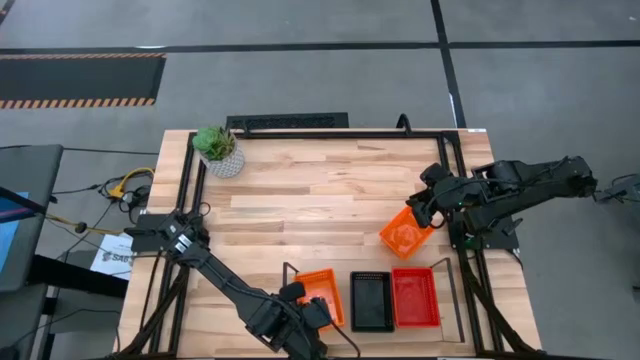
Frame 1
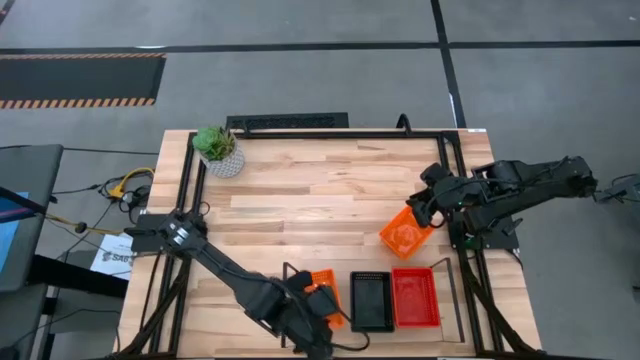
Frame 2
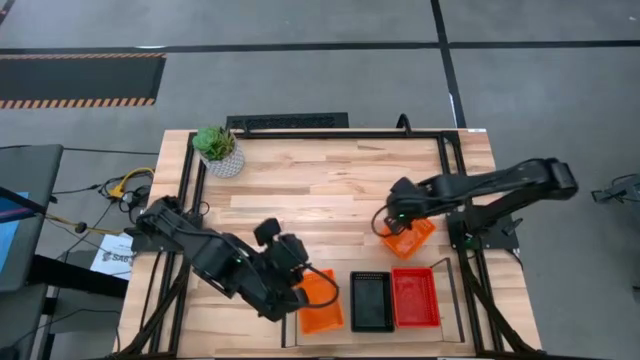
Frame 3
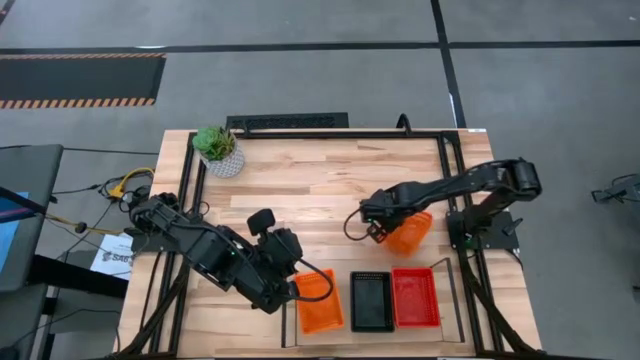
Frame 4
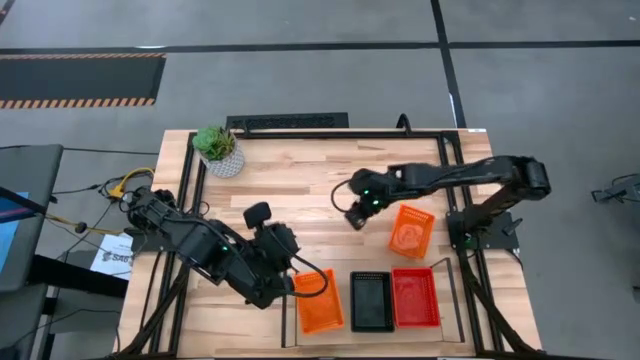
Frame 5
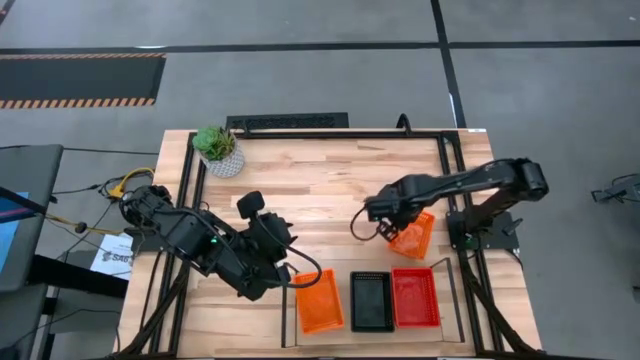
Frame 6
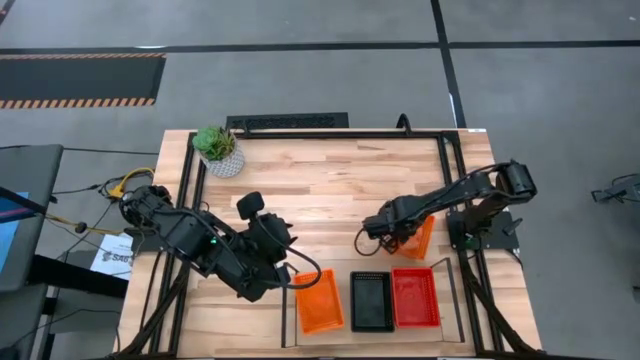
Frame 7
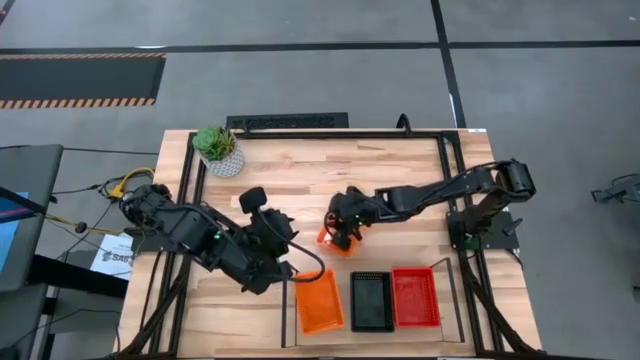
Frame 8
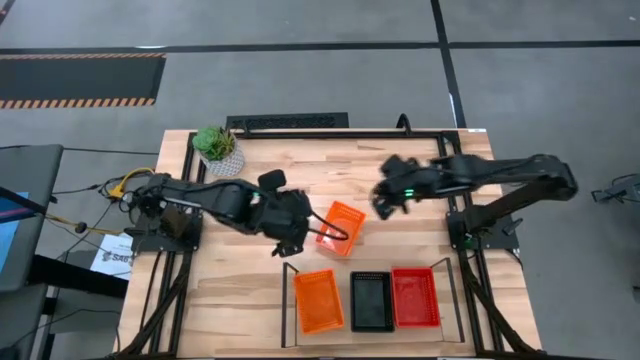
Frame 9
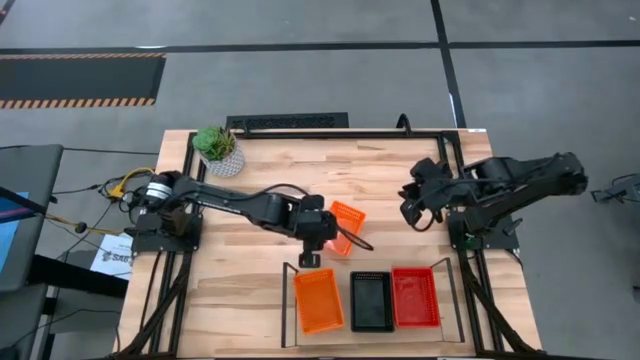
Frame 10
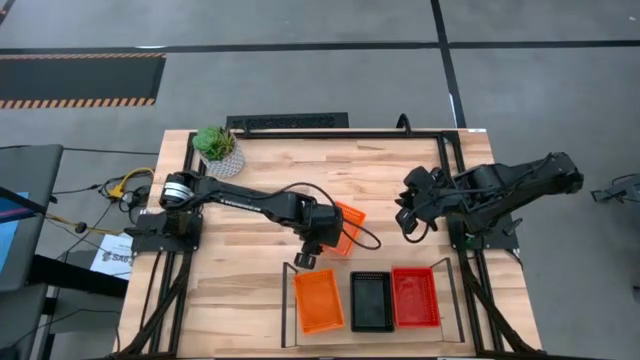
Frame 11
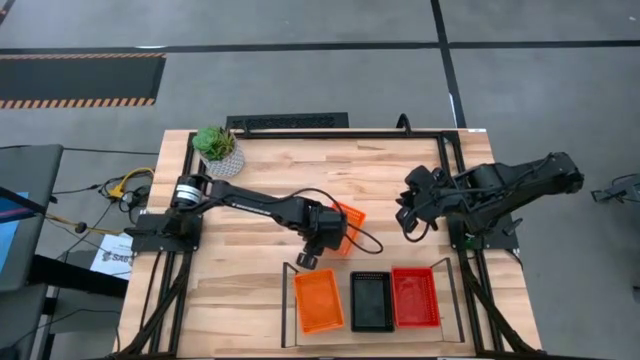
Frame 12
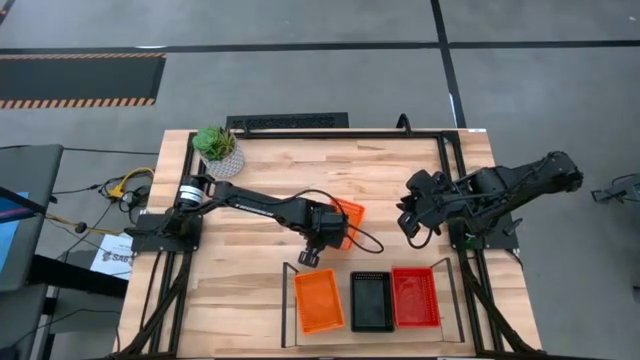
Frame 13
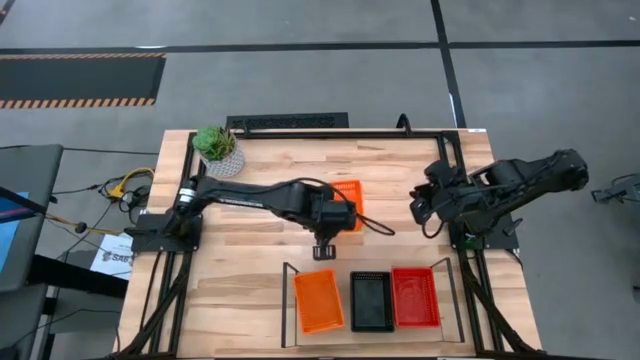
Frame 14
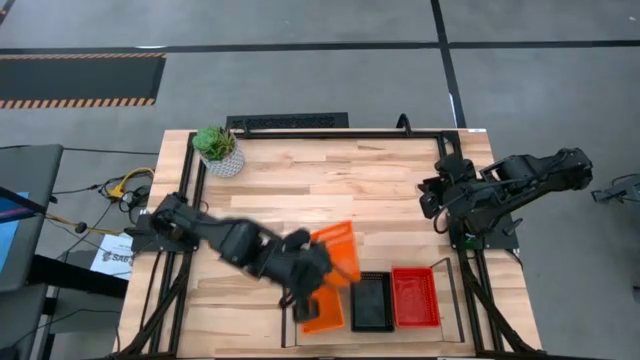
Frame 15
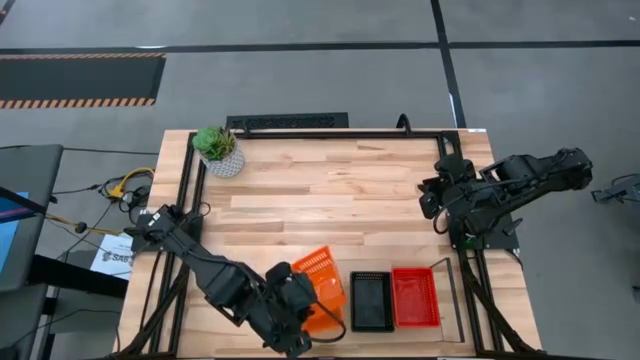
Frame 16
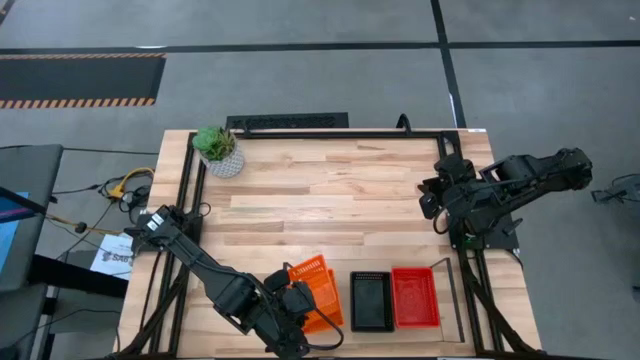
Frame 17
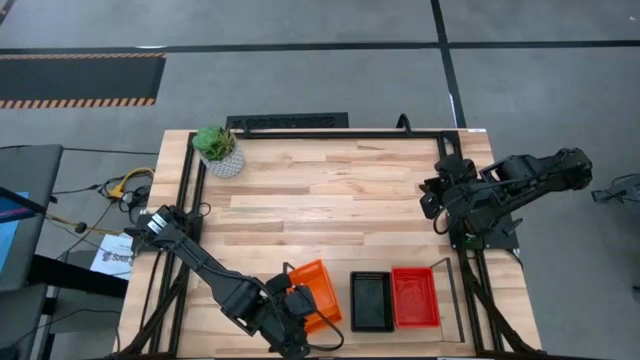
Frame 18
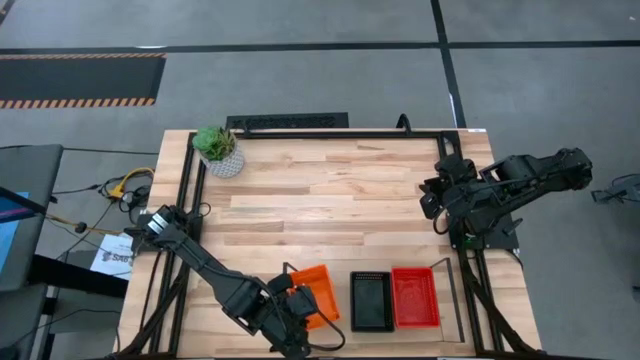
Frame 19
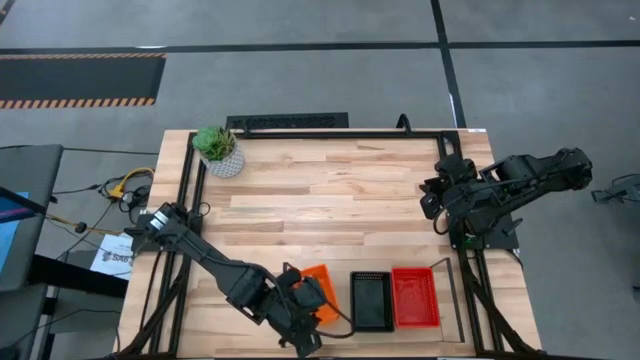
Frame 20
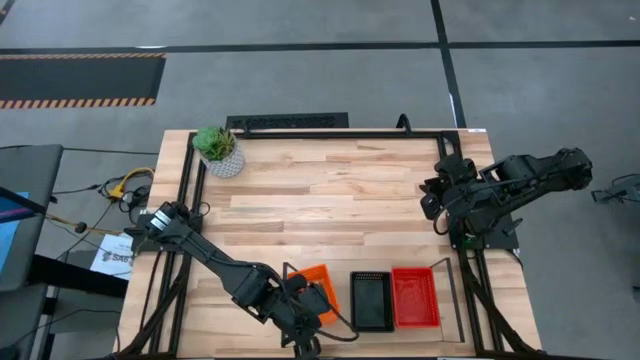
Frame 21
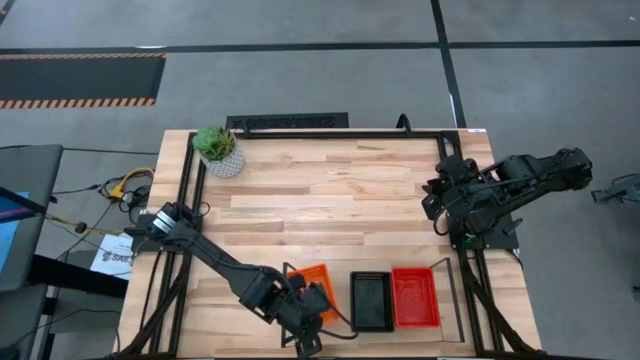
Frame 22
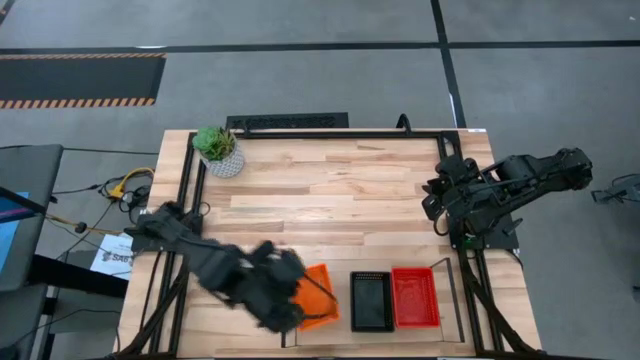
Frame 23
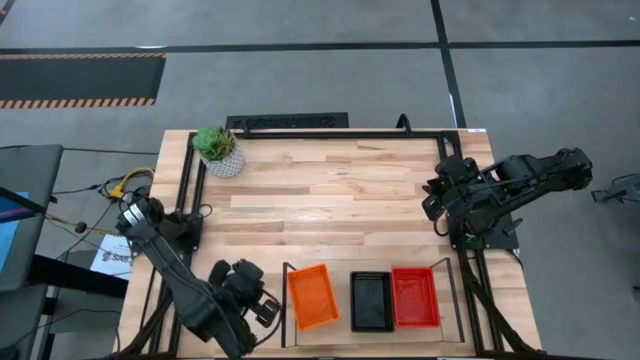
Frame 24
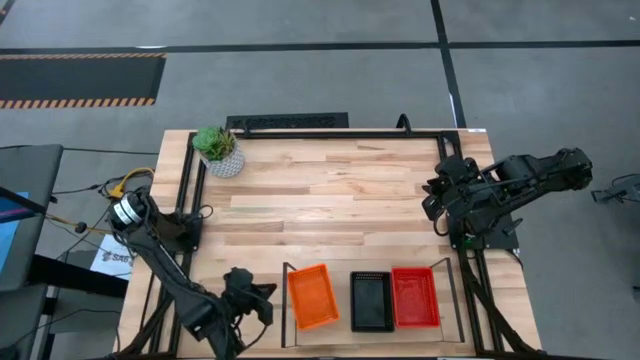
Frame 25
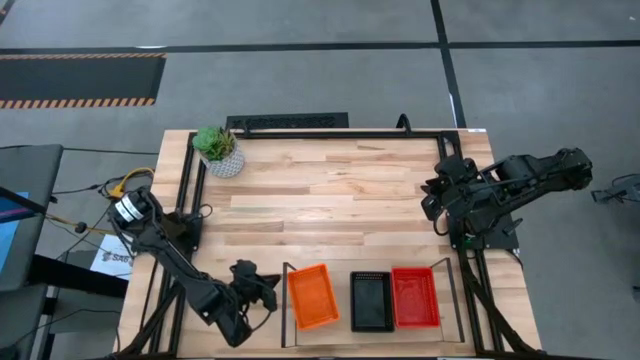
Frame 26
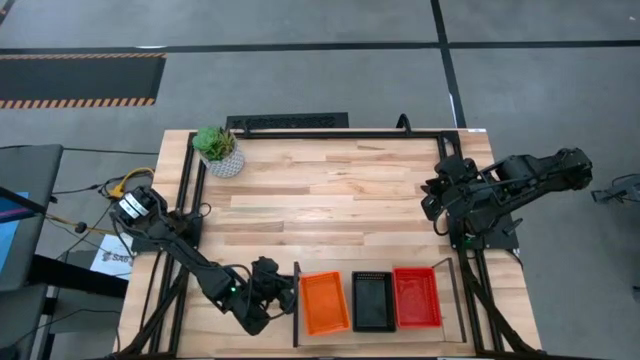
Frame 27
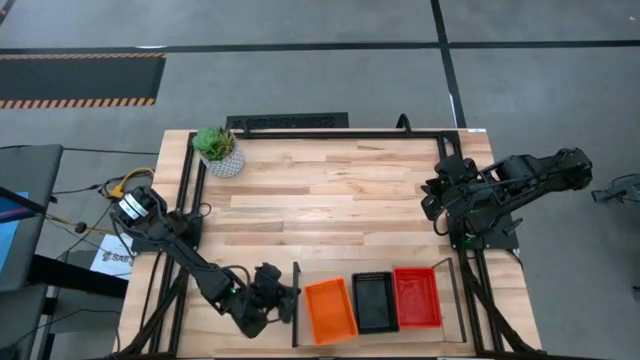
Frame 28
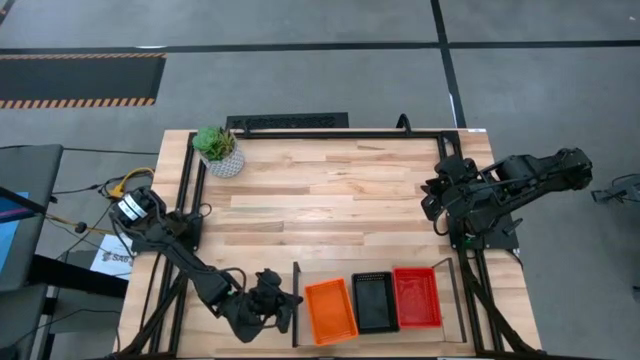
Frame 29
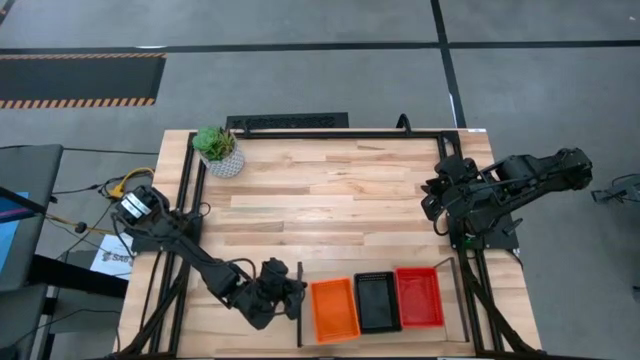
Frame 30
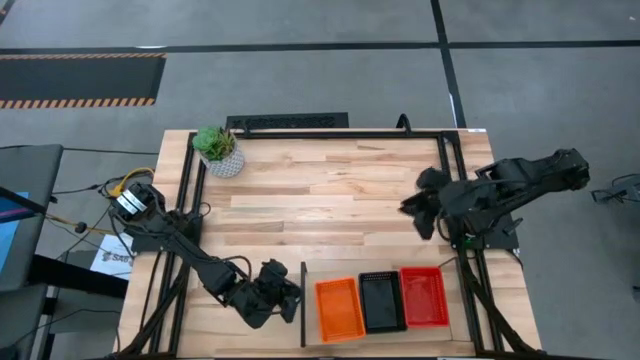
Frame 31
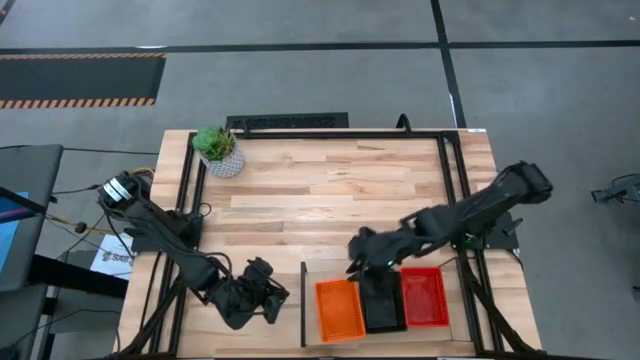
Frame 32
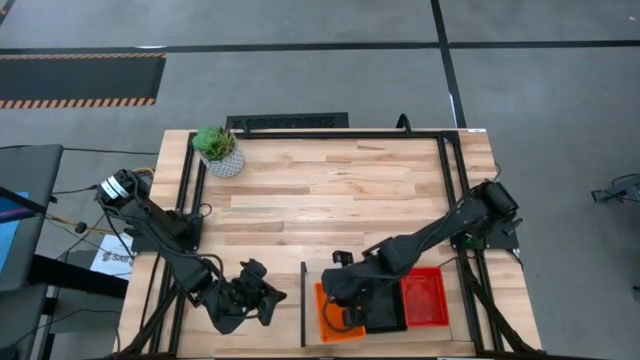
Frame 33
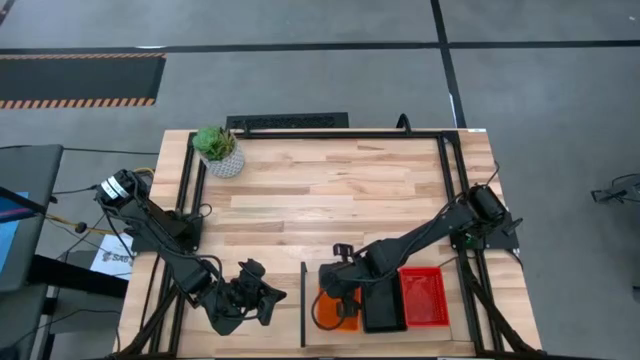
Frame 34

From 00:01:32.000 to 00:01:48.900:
Task: Stack baskets on shelf by color
Stack the orange bin on top of the orange bin on the shelf

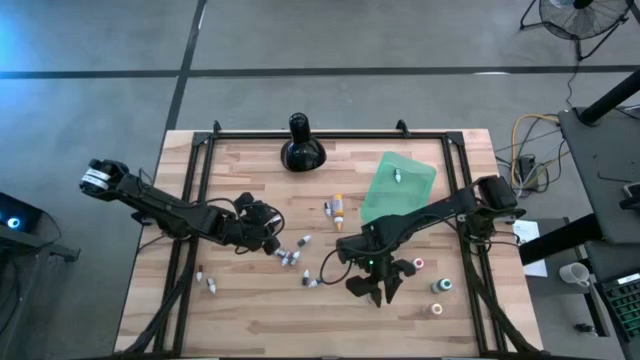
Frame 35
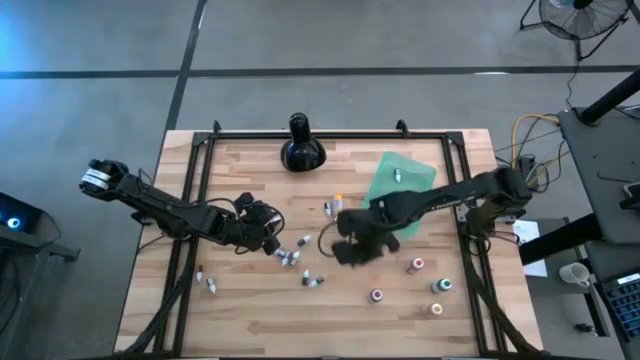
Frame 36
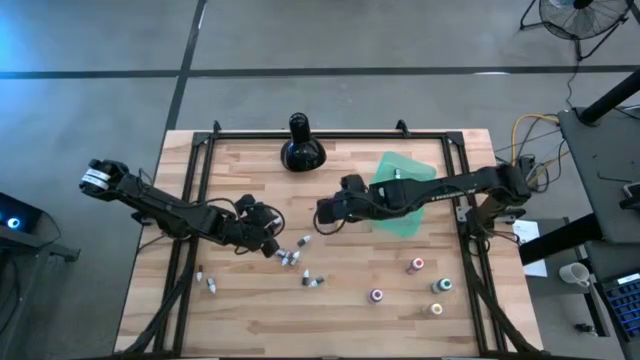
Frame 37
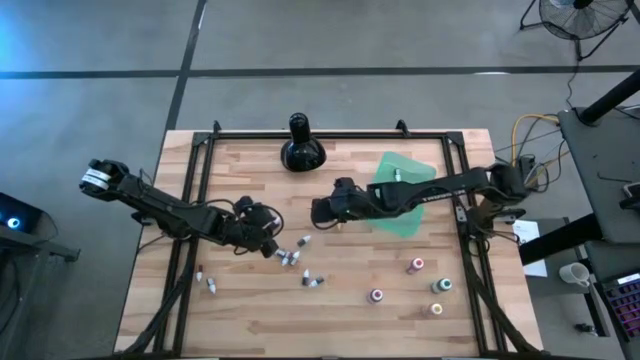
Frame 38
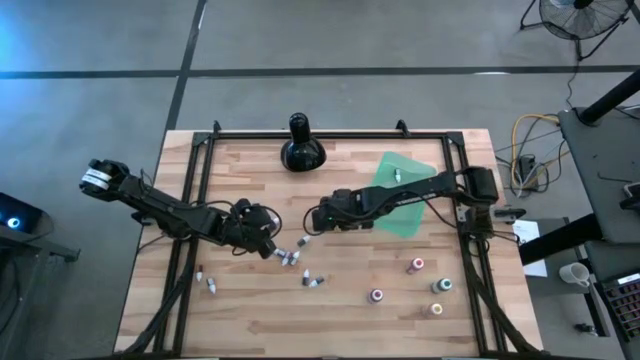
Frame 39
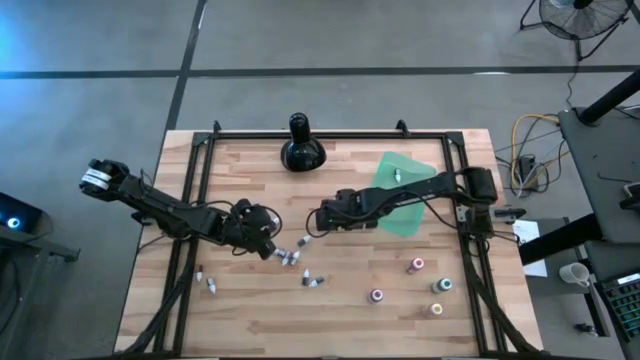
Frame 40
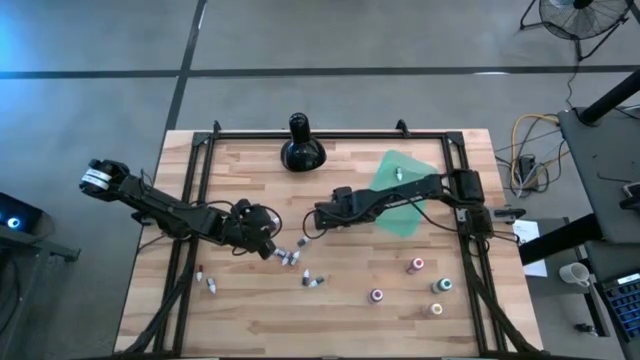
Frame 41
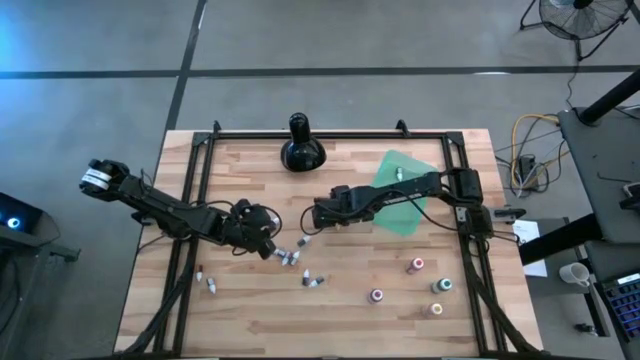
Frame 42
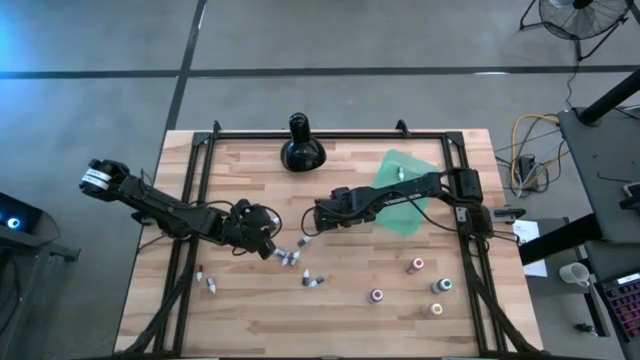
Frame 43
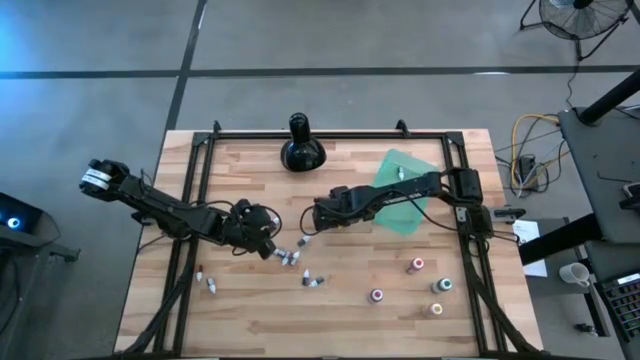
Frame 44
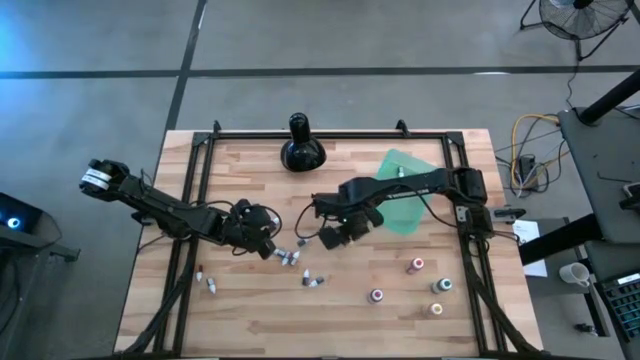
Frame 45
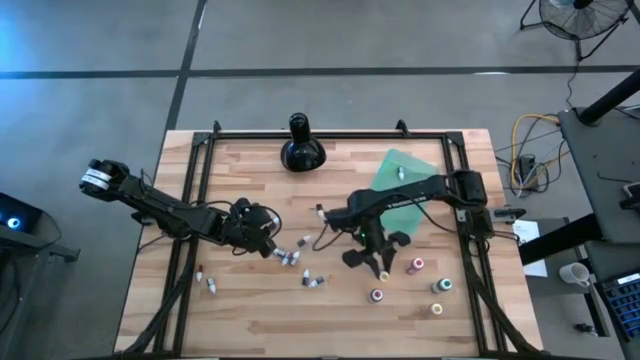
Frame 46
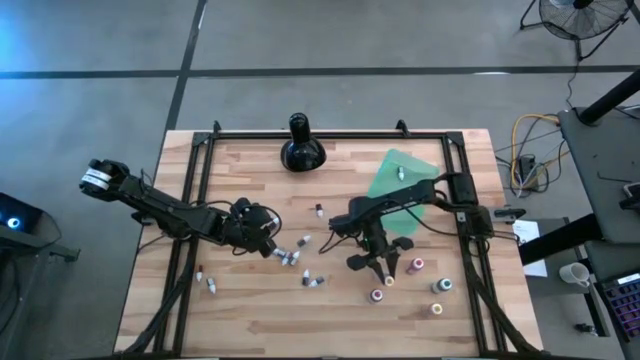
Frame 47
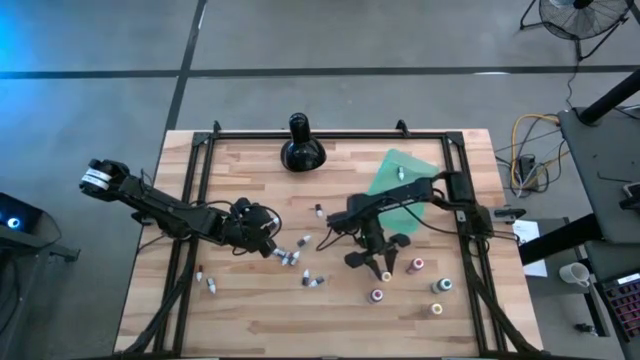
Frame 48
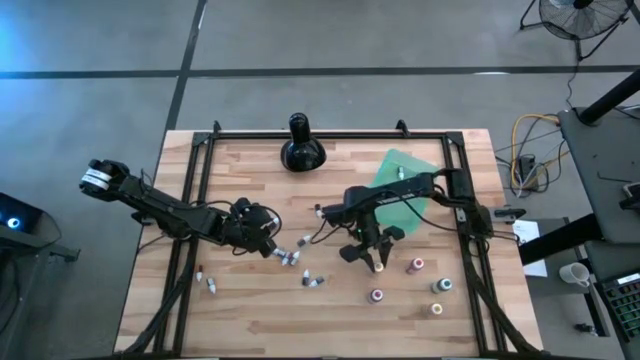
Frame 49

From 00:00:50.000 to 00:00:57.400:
Task: Pick & Place food coloring
Adjust the large yellow food coloring bottle in the table
